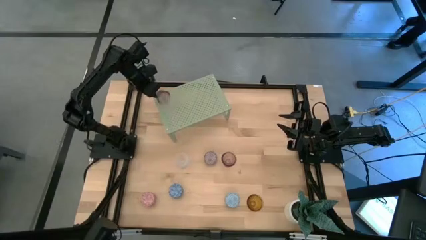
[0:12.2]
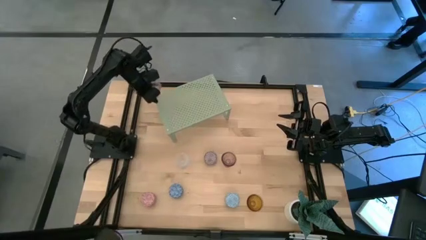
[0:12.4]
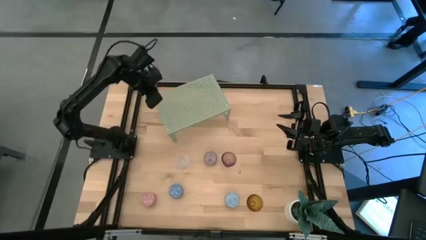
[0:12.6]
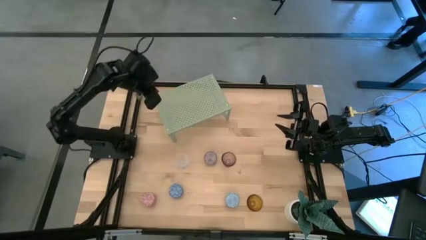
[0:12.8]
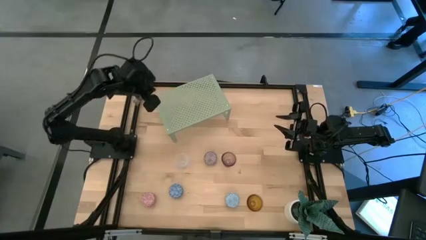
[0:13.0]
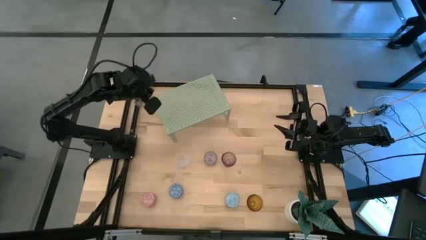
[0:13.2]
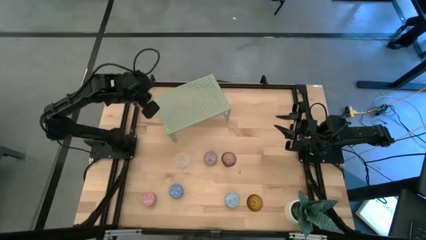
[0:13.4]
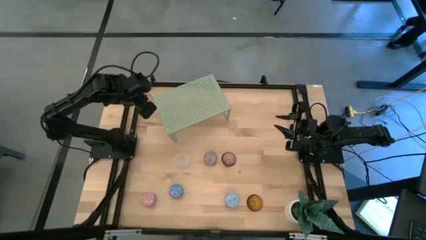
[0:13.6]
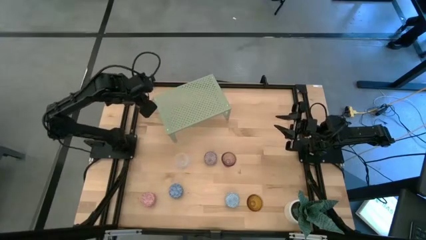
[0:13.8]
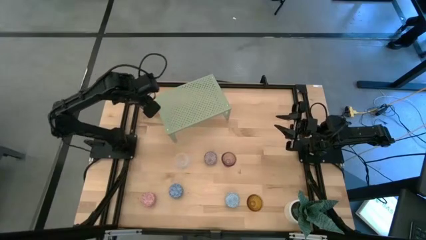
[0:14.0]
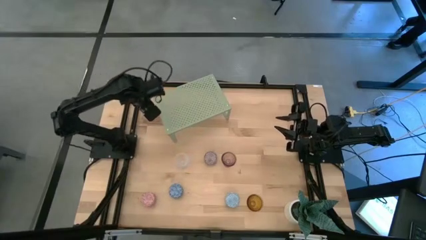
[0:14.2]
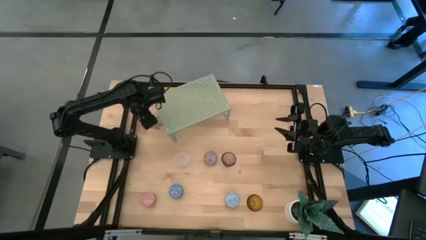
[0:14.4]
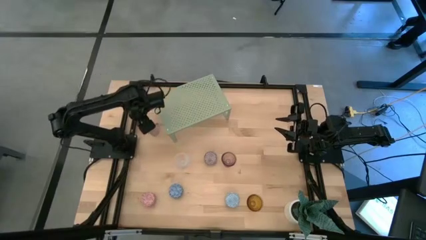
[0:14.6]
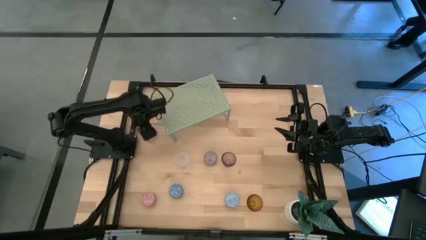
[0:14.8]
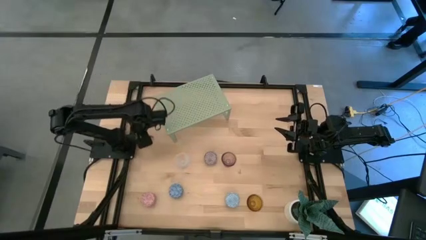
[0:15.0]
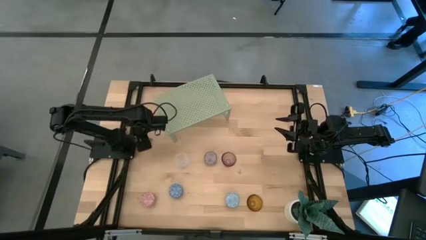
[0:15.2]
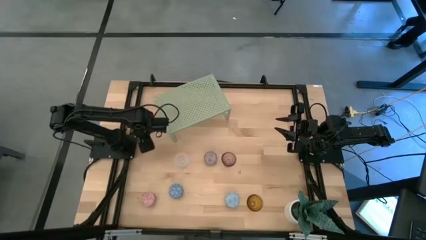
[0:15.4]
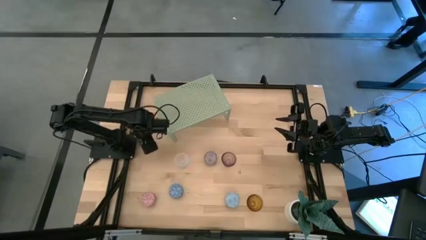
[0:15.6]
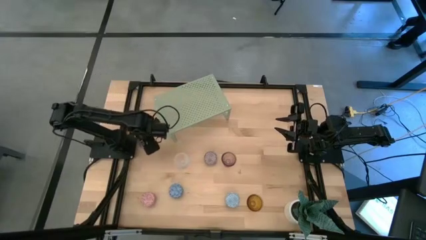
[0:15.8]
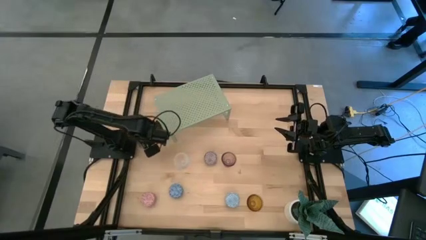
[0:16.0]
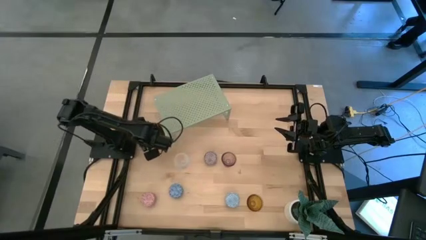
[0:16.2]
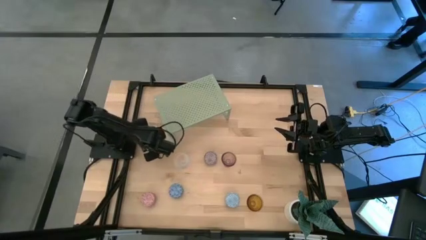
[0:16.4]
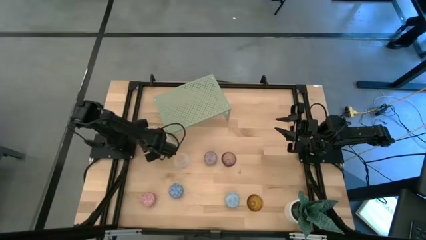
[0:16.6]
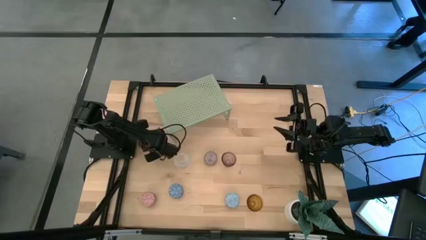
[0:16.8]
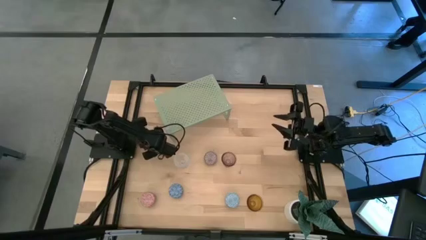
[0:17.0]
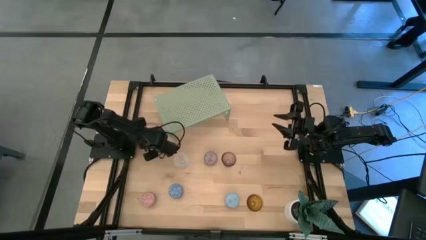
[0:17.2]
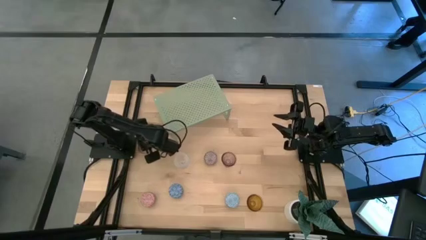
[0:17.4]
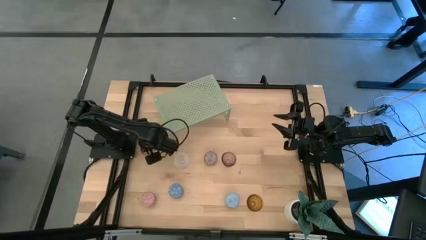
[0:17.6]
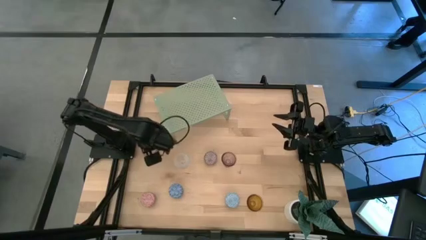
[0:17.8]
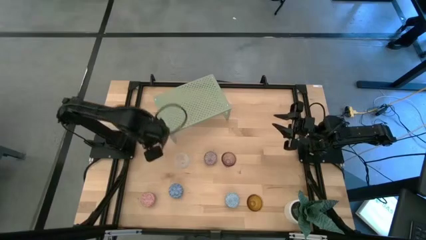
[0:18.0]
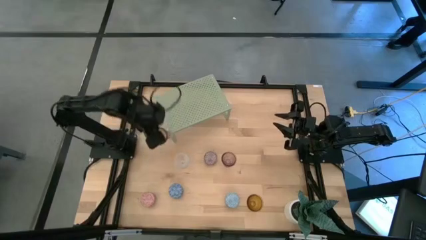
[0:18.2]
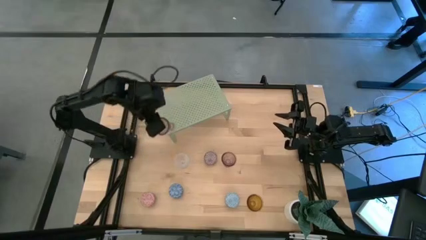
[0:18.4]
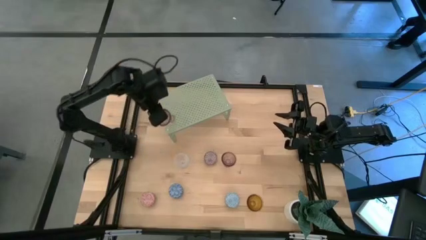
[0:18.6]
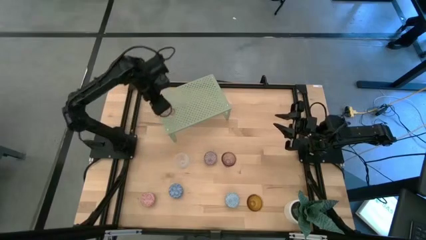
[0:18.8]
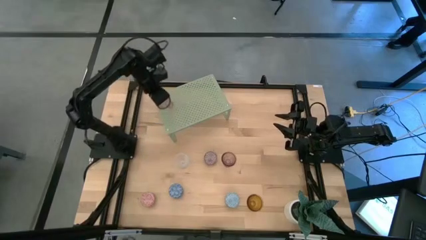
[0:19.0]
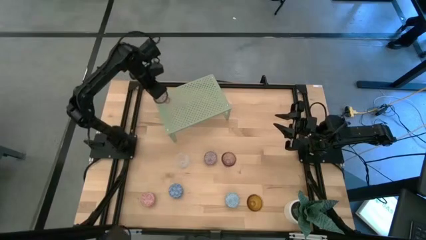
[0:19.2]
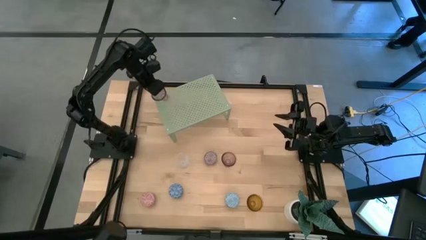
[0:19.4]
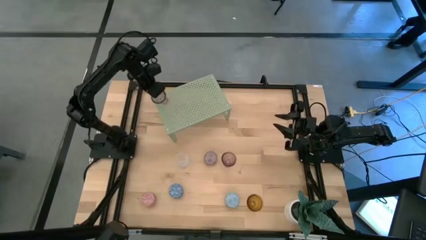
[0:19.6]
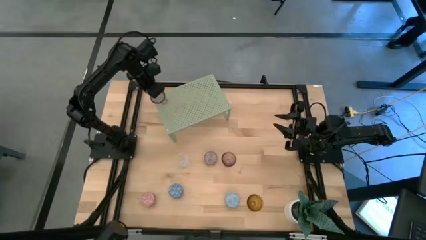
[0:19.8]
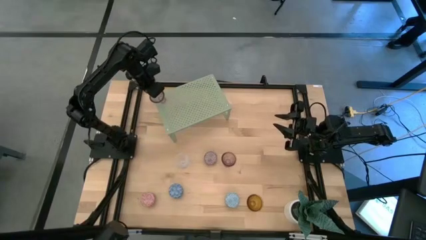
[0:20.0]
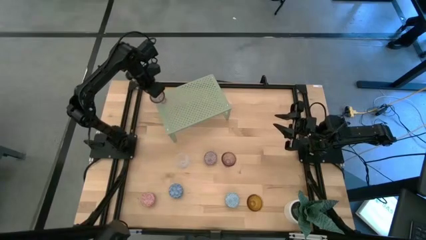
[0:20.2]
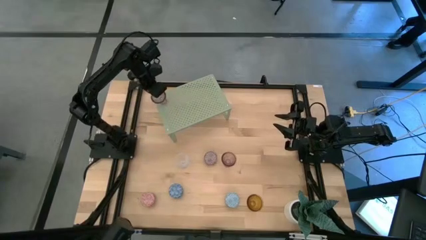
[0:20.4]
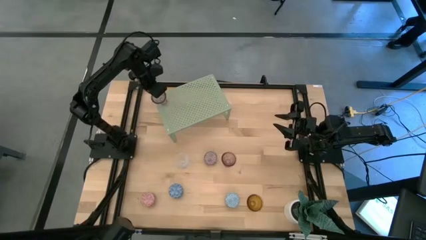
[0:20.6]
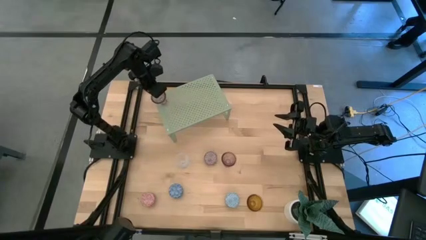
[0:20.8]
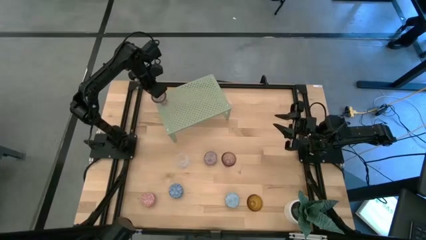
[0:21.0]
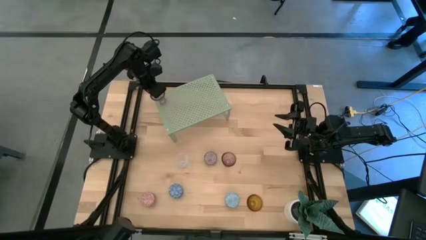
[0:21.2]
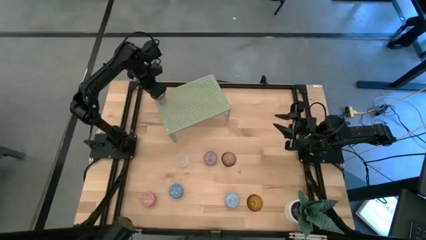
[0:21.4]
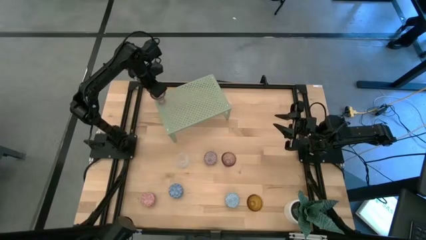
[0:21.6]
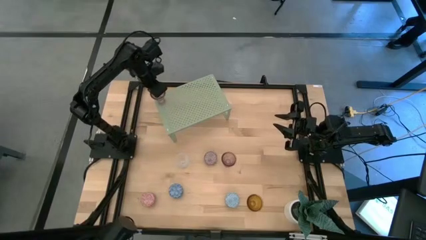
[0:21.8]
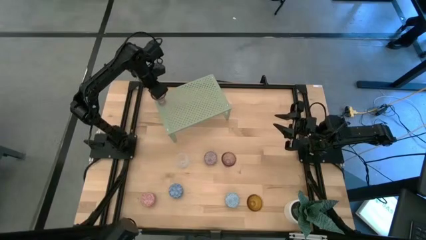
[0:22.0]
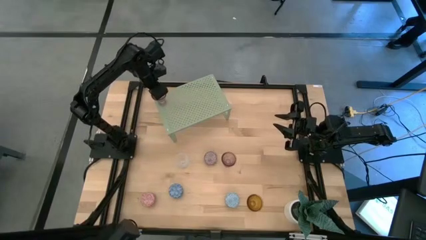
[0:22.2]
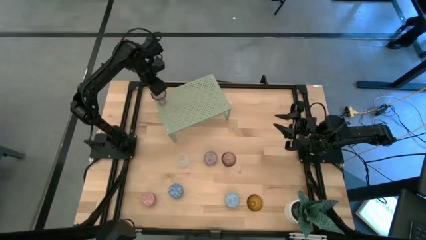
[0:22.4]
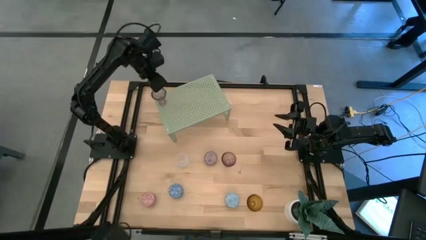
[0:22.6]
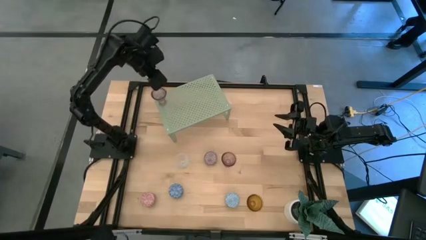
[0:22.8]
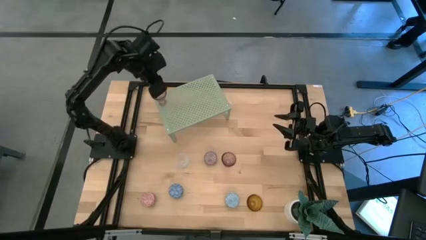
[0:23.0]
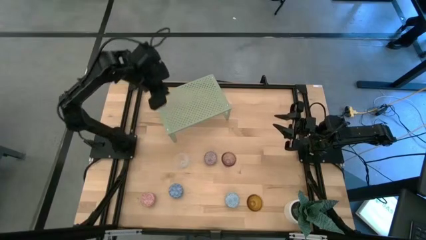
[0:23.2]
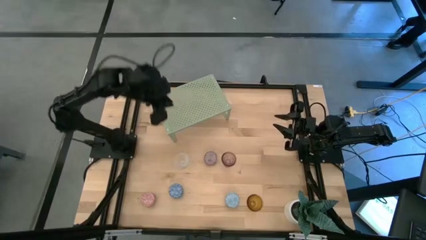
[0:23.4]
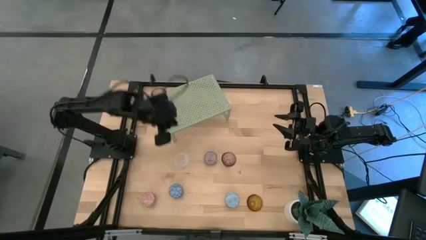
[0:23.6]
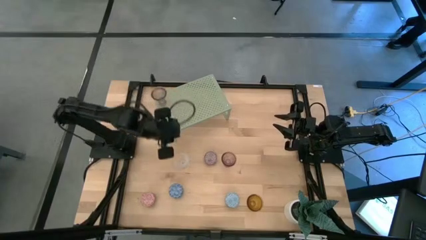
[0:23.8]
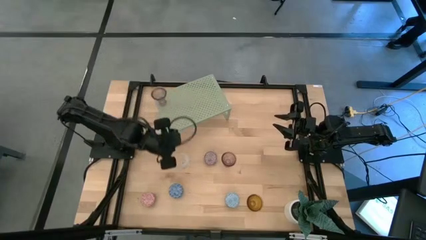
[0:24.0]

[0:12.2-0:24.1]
Task: Pick & Place candle stick holders
Put the left pink glass candle holder on the shelf
